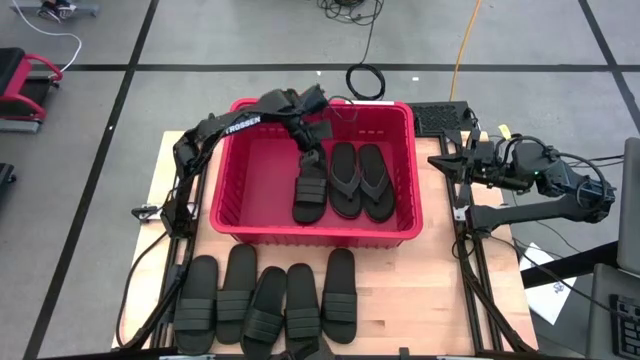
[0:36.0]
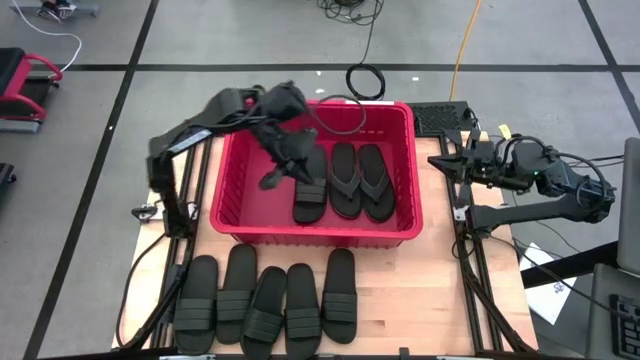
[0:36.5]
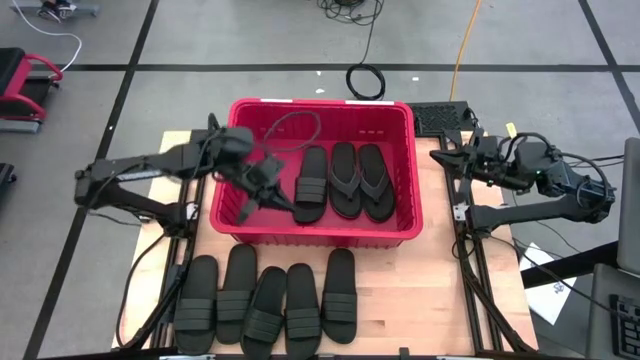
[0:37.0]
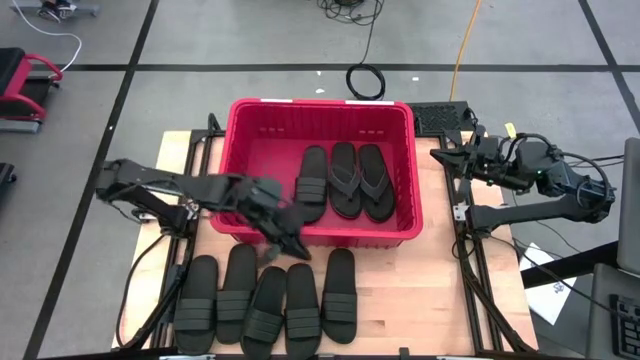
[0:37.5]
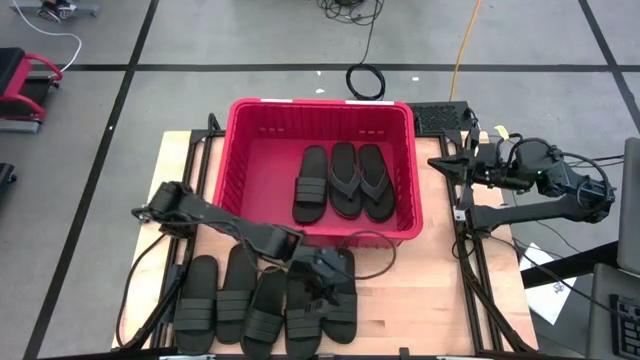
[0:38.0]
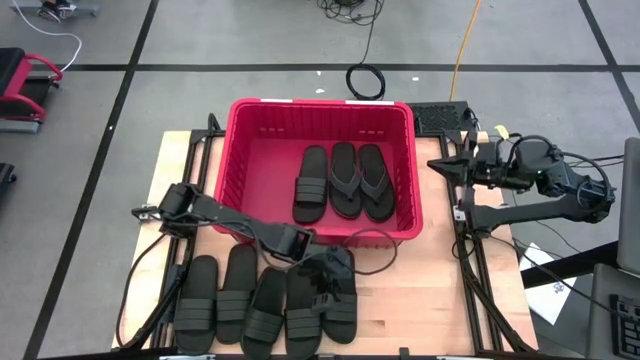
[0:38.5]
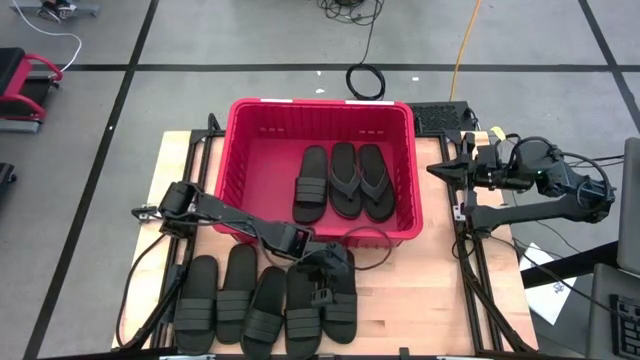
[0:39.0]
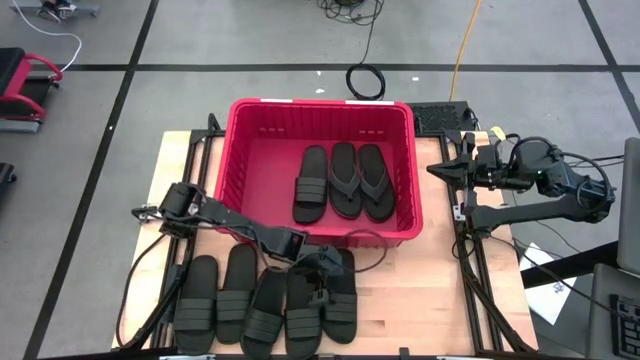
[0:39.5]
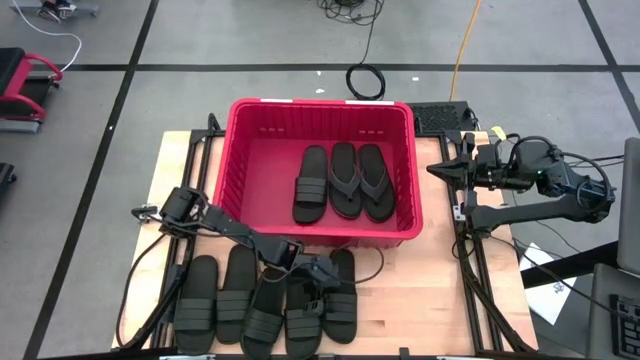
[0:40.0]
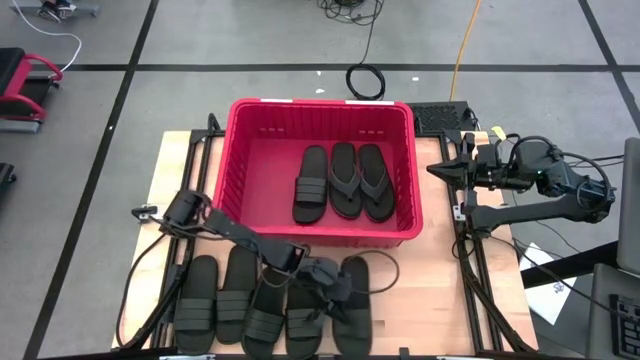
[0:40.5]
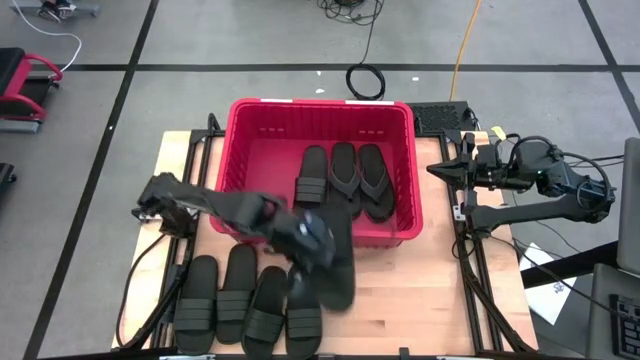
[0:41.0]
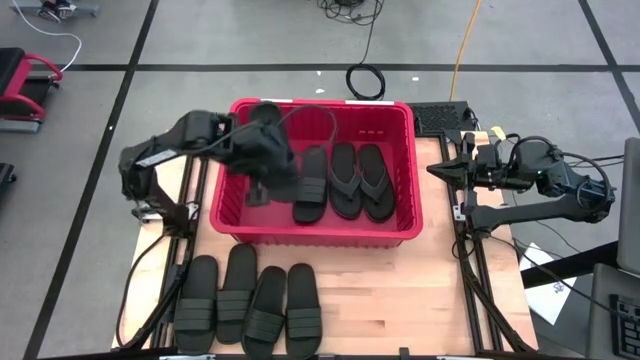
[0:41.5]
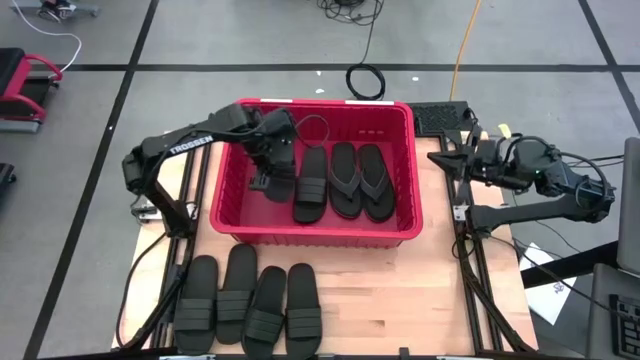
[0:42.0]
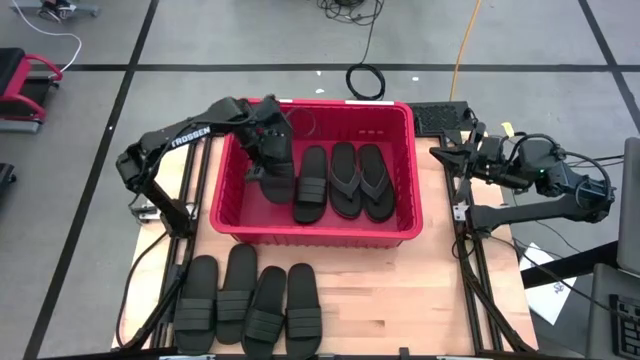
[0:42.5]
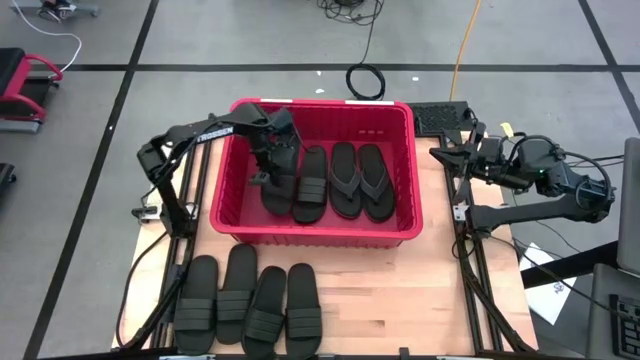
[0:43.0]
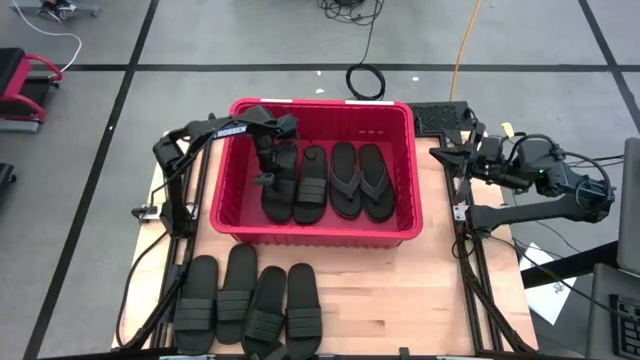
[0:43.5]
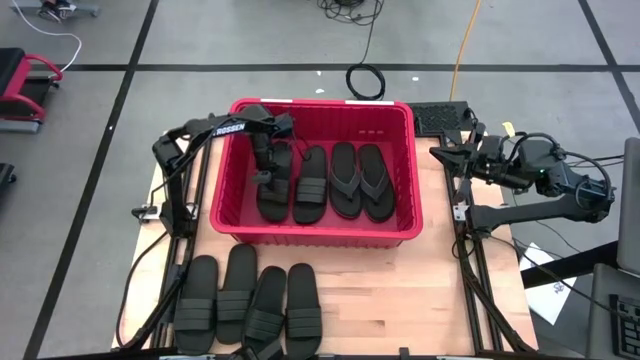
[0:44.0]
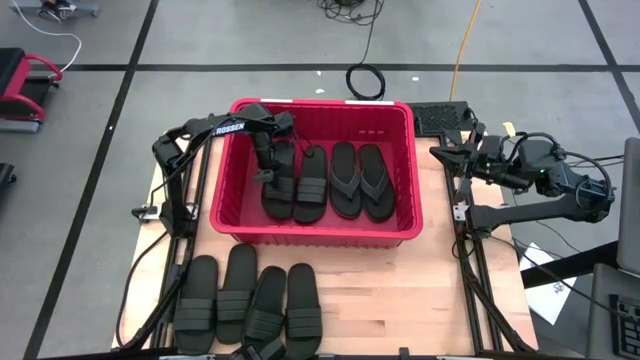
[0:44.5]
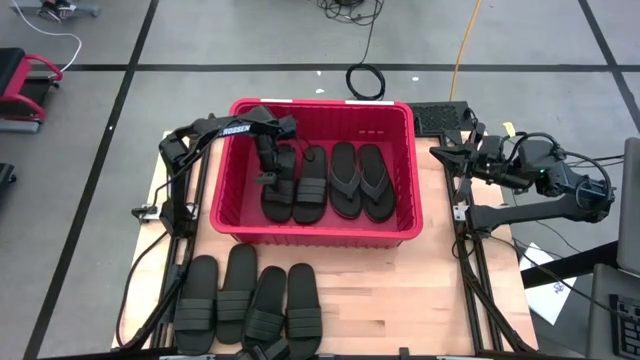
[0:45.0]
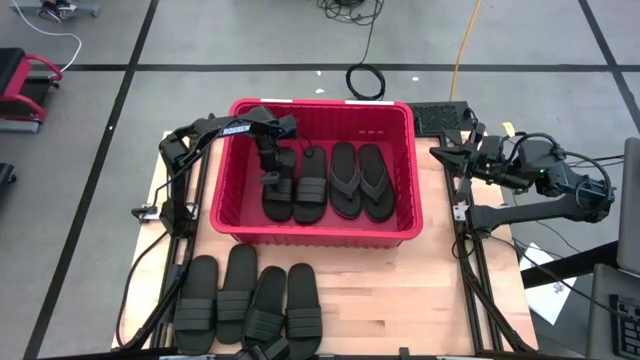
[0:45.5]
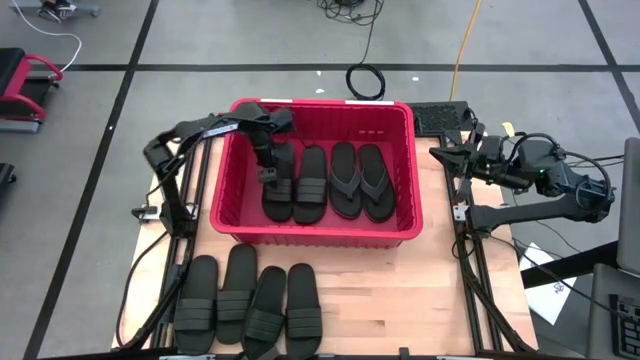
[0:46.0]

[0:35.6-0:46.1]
Task: Pick and place slides into bin
Put the slide into the red bin

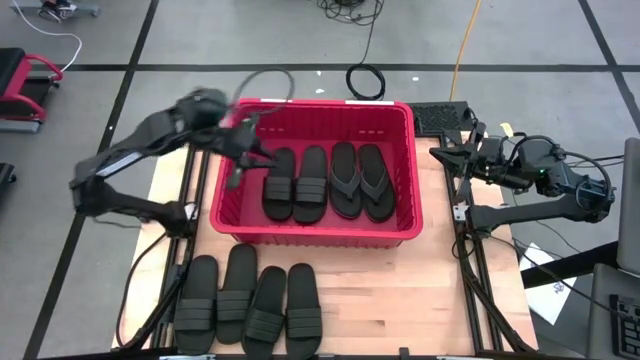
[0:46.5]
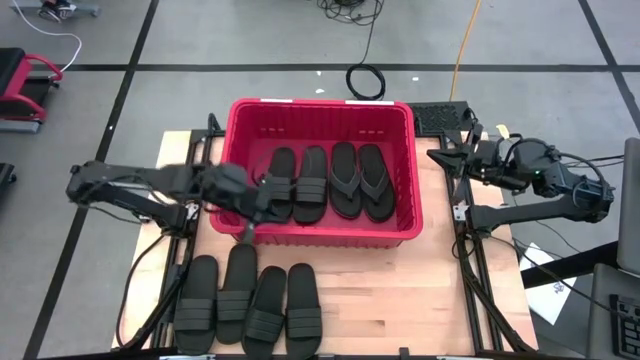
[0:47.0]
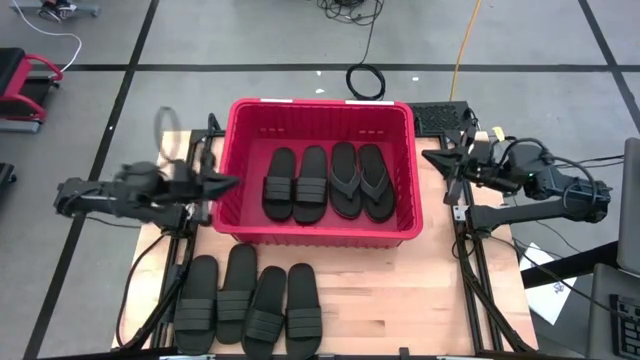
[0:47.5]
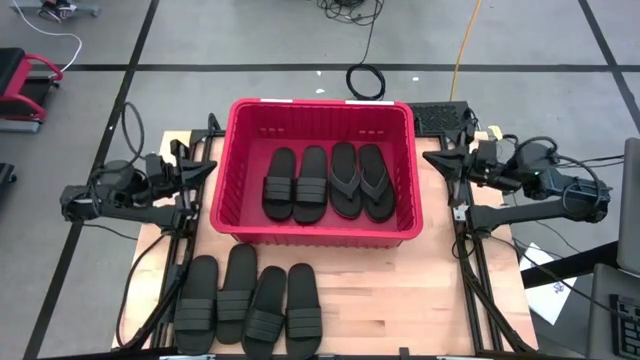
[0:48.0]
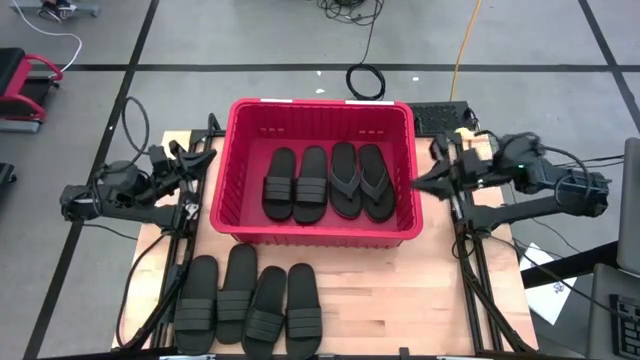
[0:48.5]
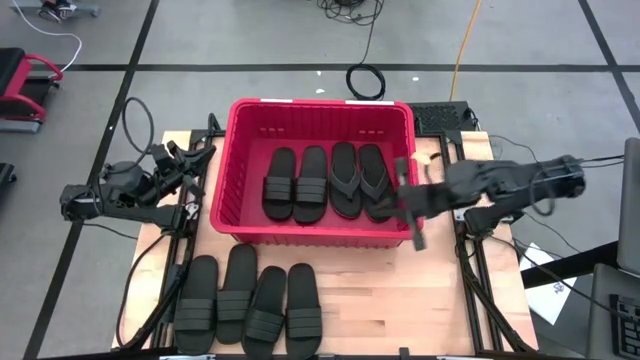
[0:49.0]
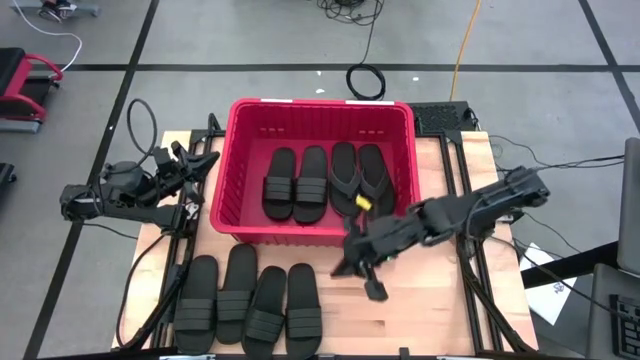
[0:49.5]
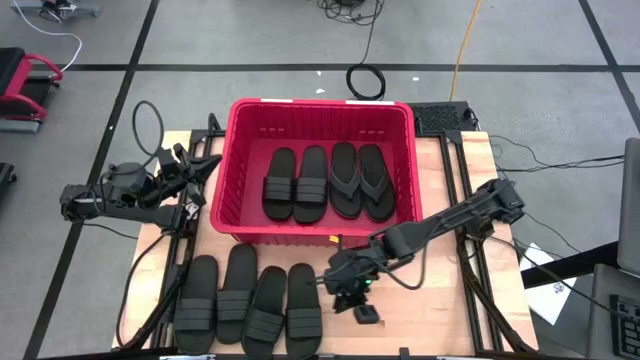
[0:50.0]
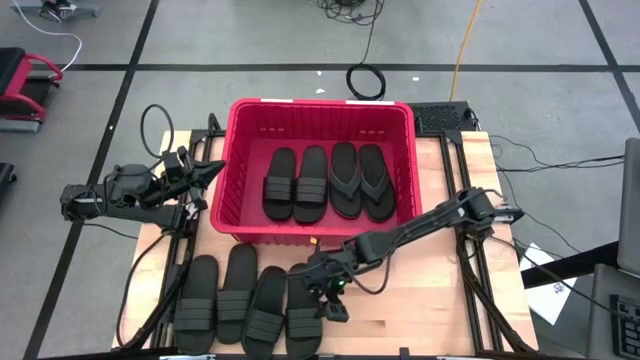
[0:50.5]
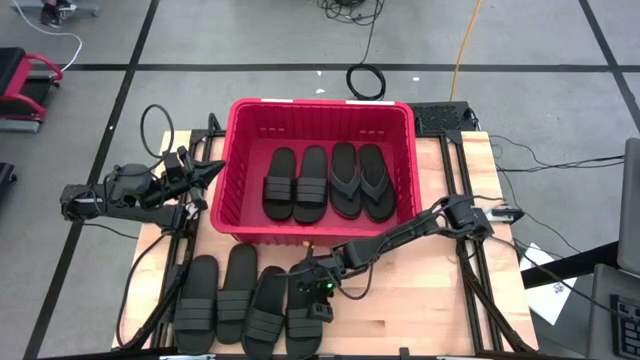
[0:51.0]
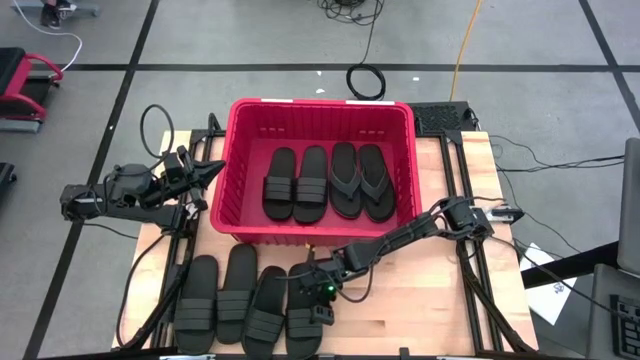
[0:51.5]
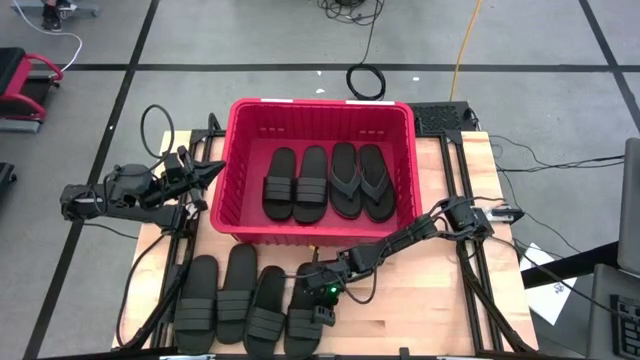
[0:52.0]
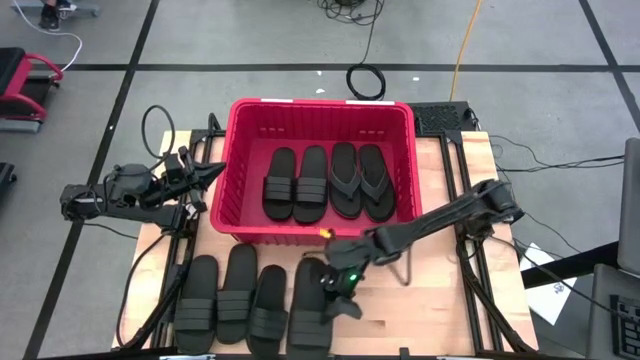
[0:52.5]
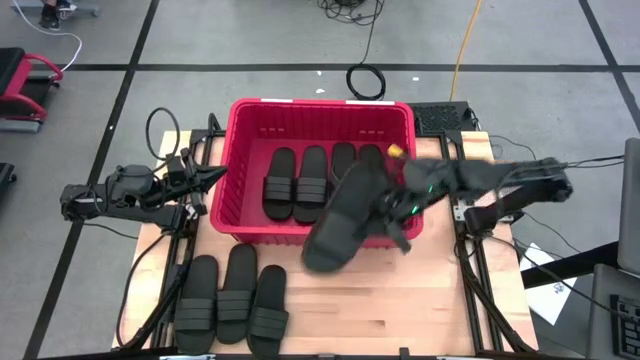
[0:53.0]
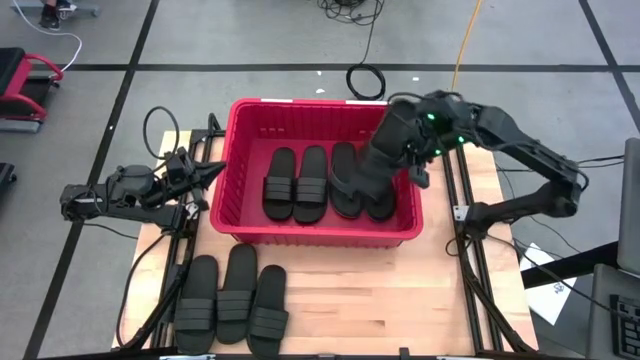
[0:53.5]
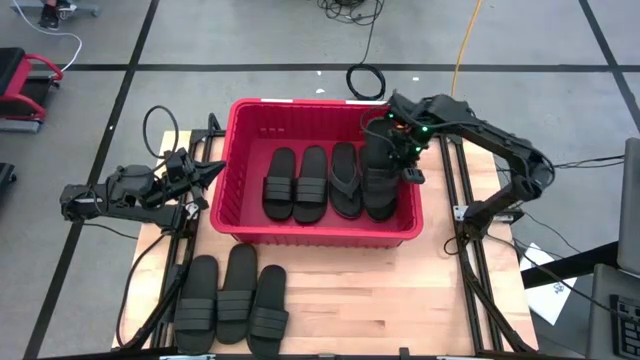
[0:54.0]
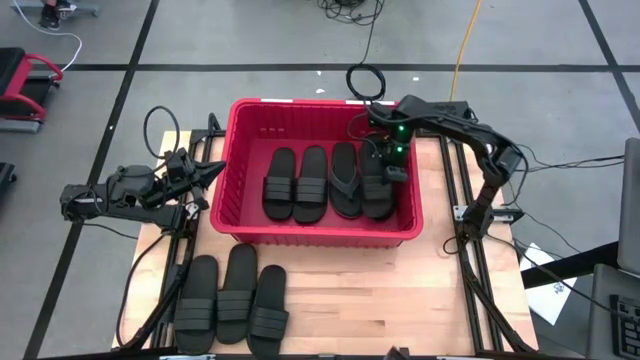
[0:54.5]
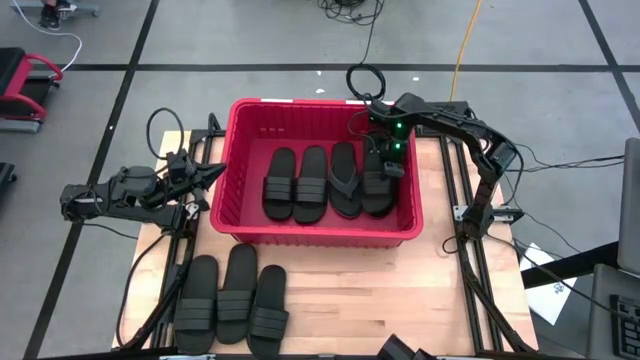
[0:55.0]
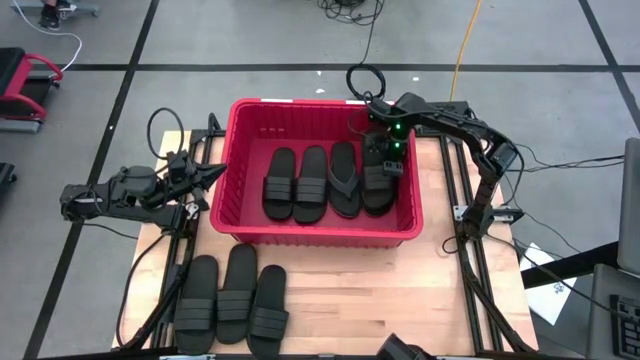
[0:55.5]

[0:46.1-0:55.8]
Put the slide into the red bin
